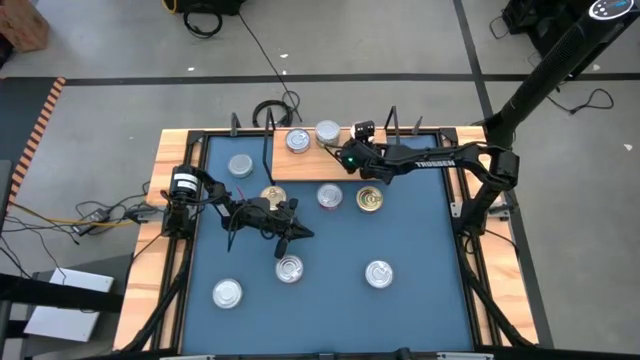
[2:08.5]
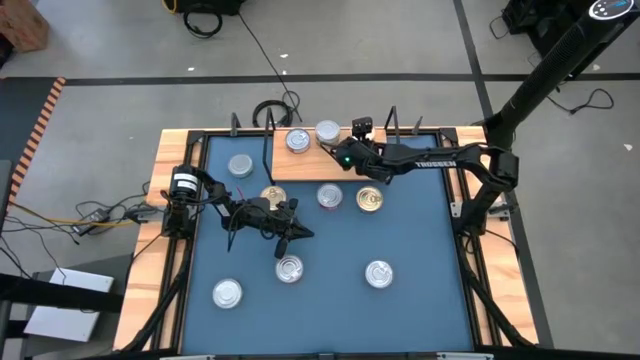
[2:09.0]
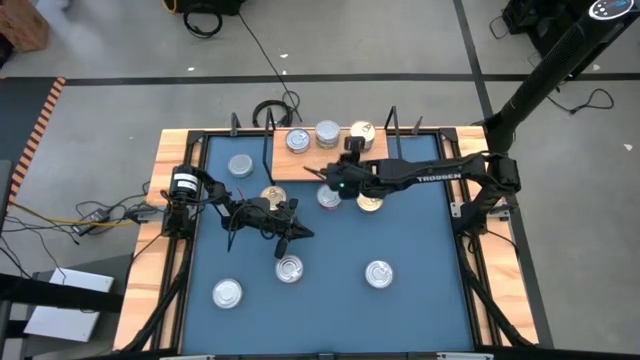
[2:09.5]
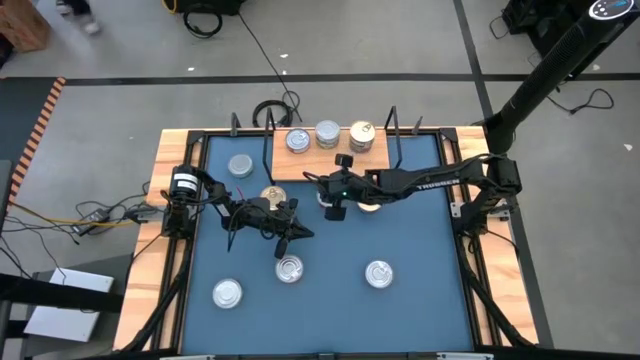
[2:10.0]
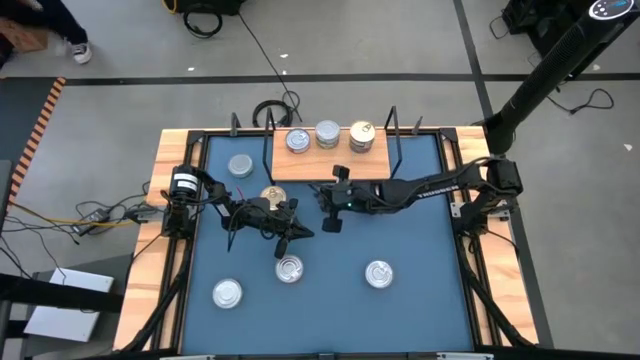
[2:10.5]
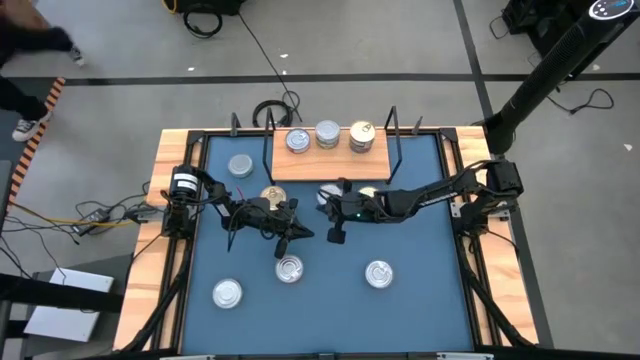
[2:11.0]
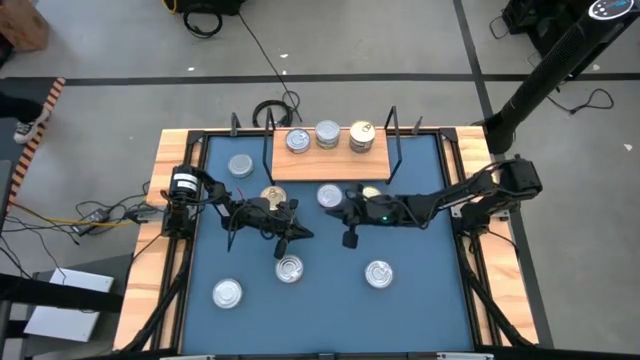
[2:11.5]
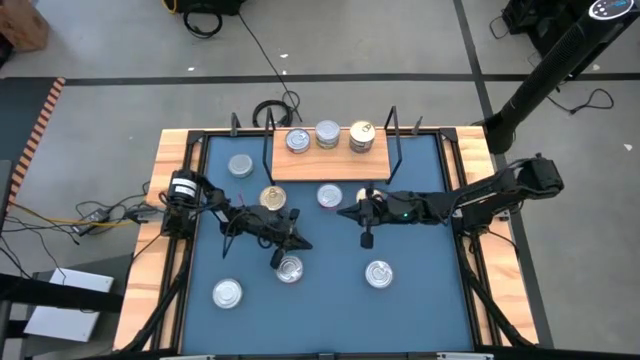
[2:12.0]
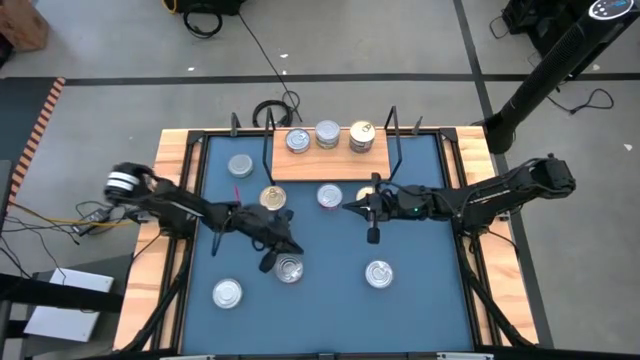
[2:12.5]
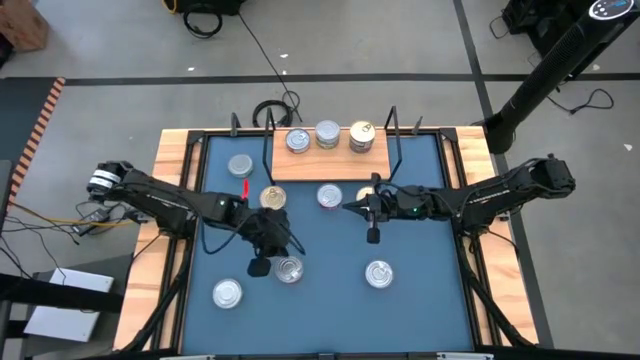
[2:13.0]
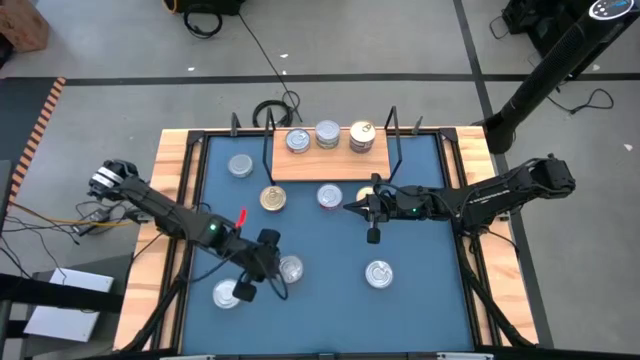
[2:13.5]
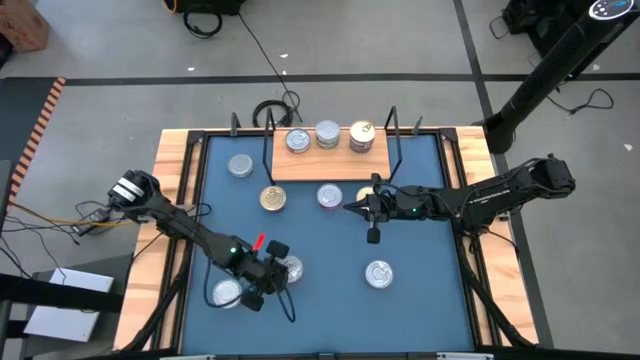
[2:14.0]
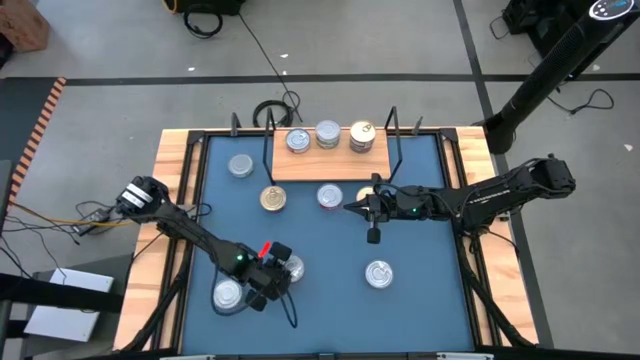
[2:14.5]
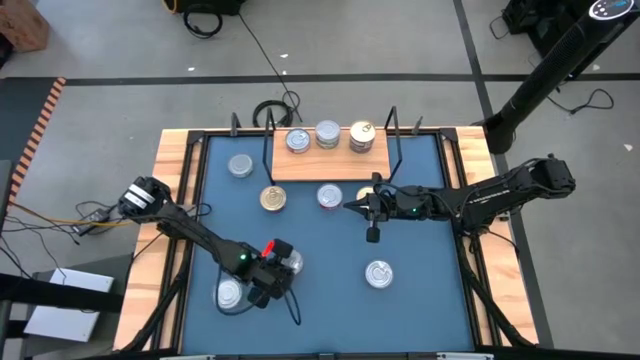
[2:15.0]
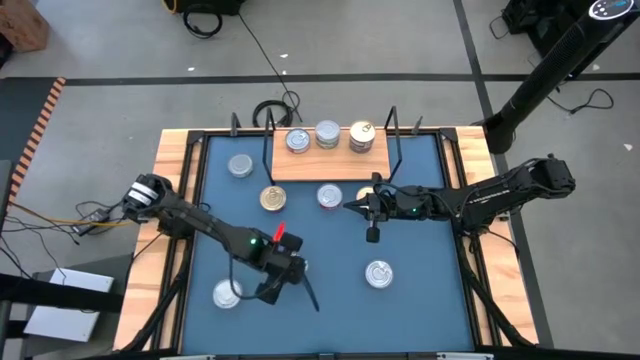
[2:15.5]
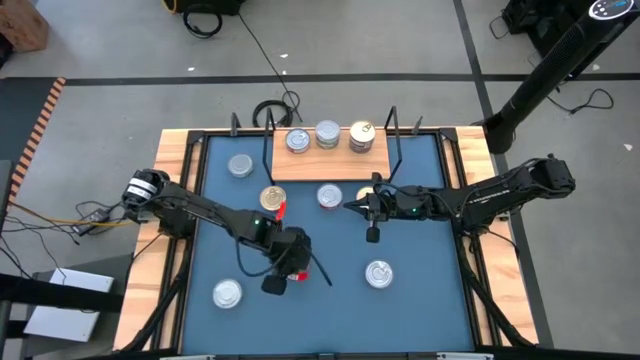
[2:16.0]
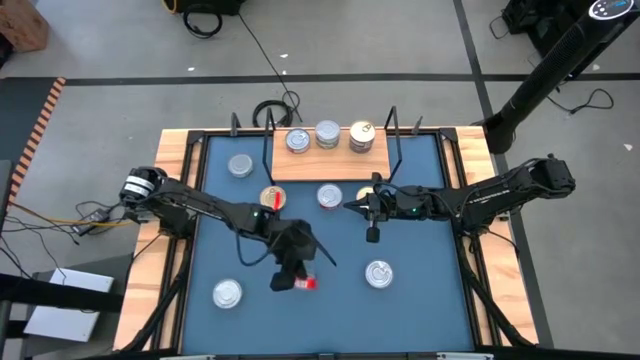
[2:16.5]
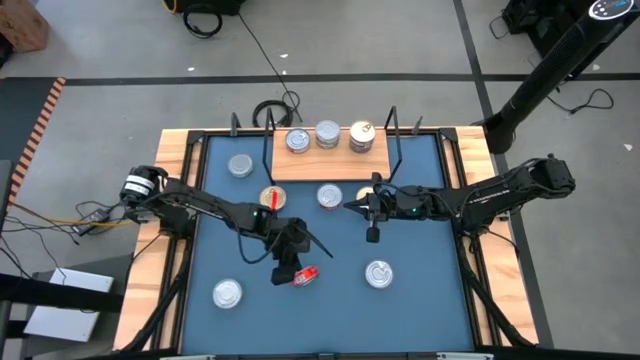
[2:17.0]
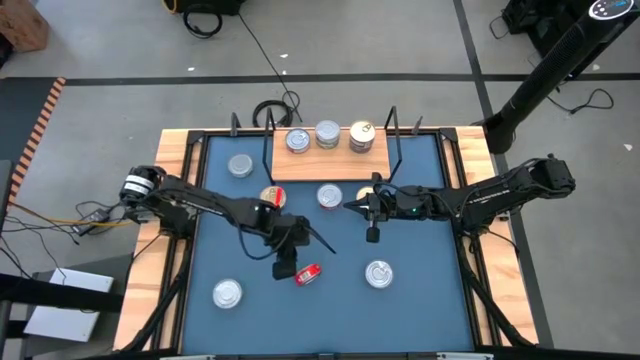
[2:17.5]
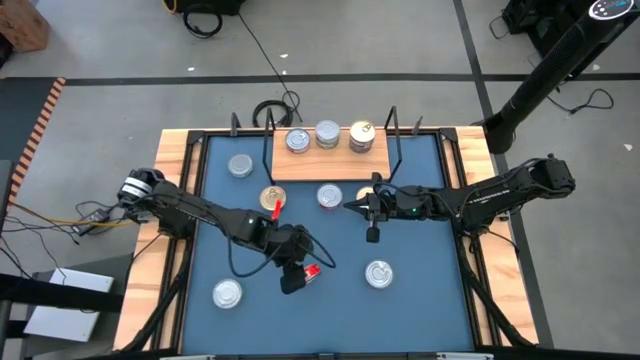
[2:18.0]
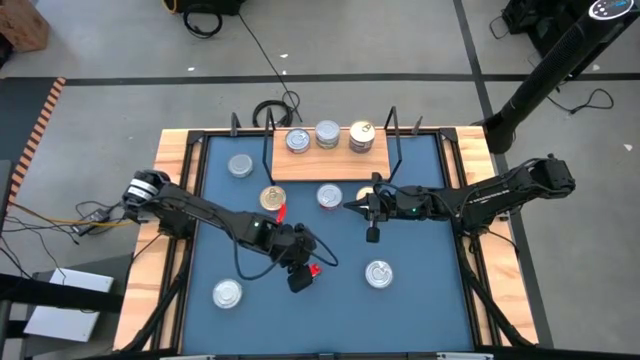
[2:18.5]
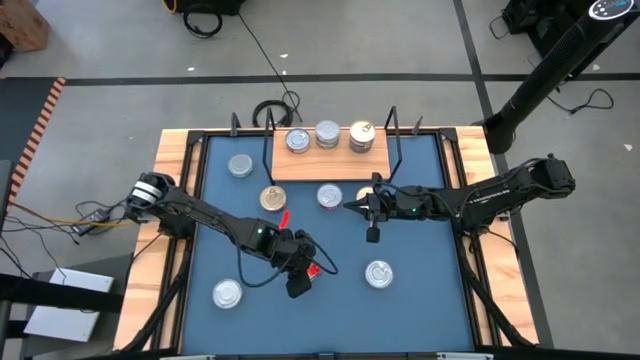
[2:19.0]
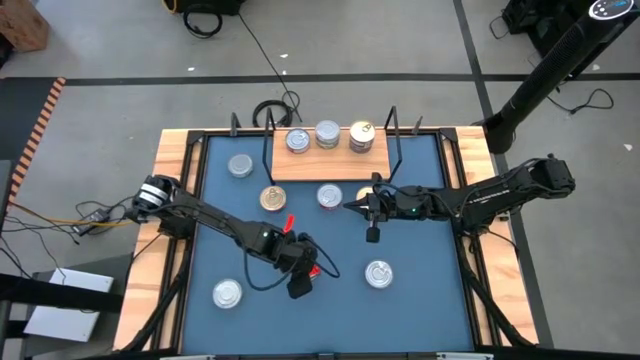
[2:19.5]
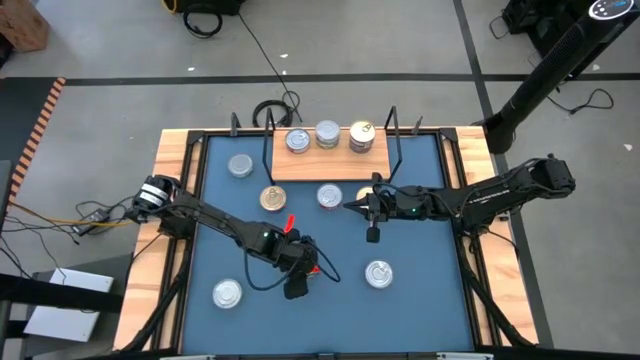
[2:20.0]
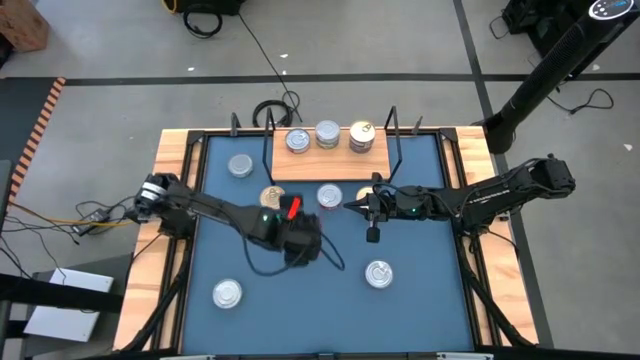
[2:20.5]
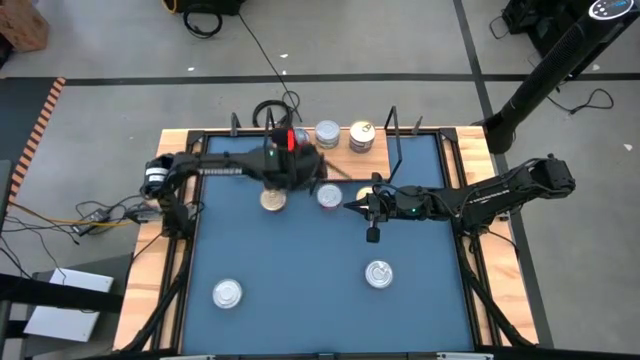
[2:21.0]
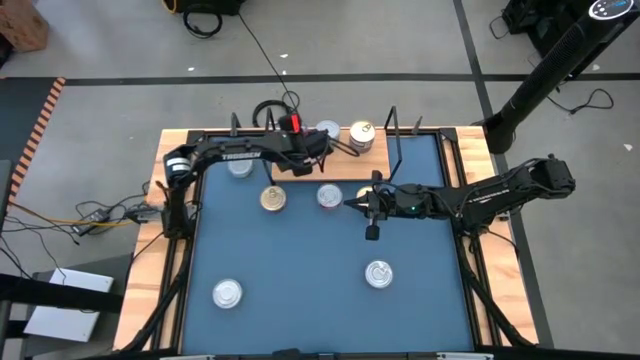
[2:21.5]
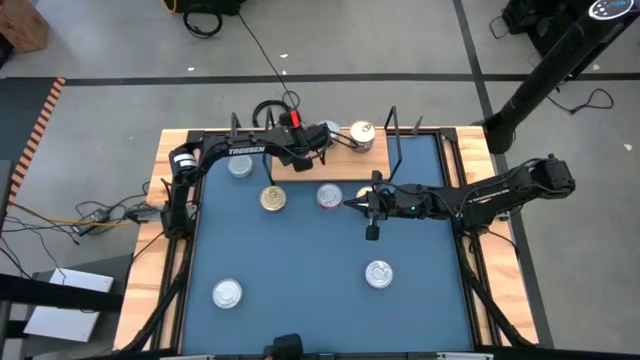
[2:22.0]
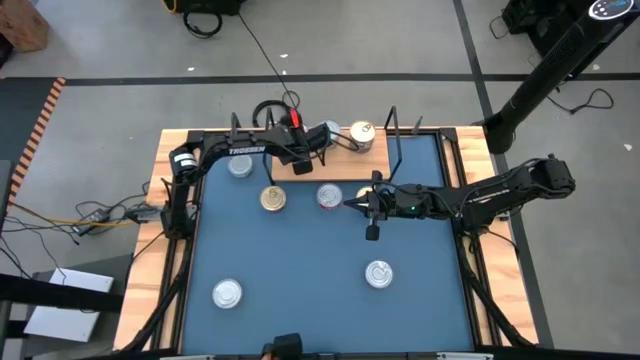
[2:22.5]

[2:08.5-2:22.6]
Task: Stack canned seafood by type on shelf
Stack the red tuna can on top of the other red tuna can on the shelf
